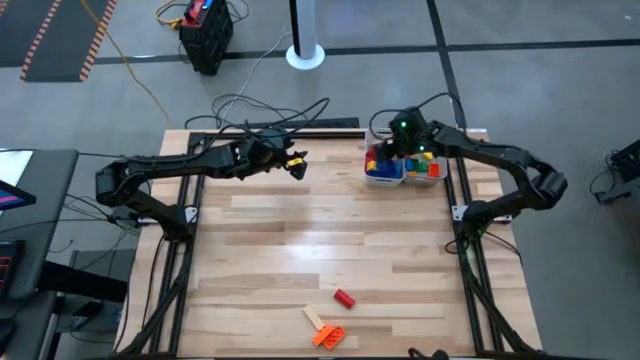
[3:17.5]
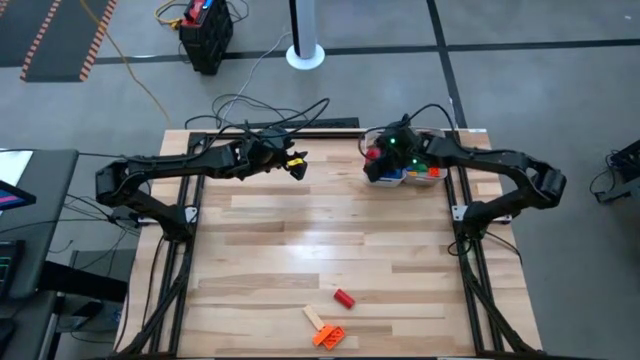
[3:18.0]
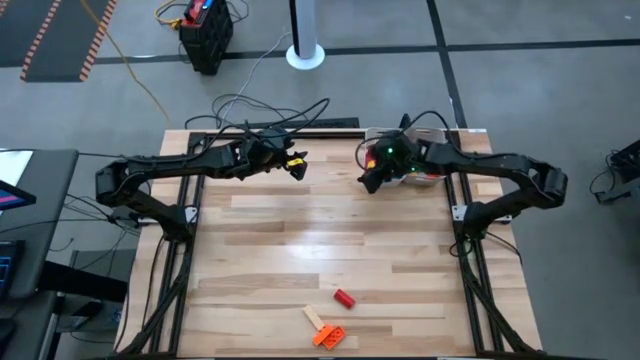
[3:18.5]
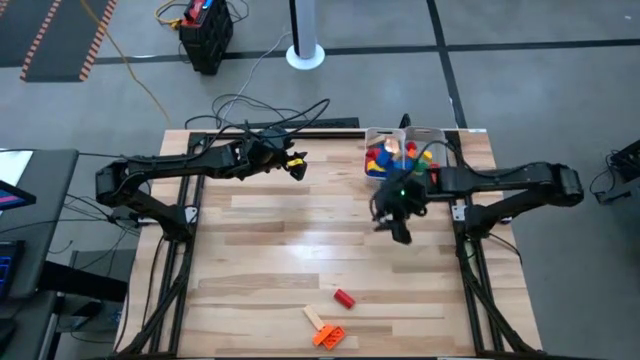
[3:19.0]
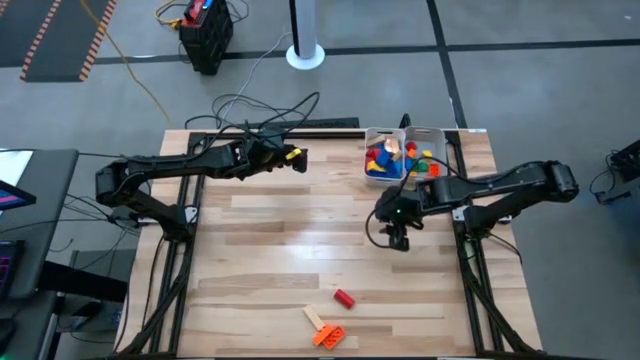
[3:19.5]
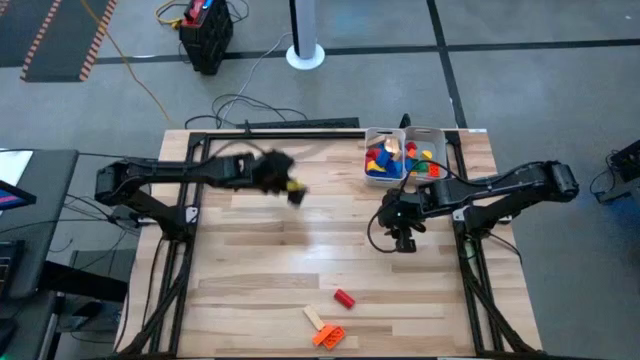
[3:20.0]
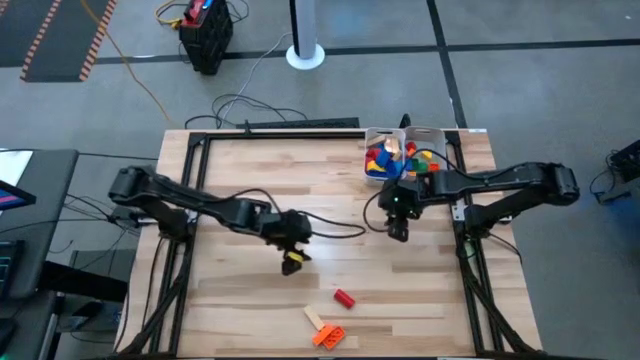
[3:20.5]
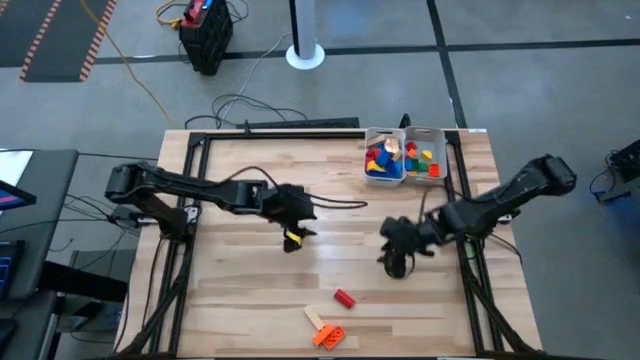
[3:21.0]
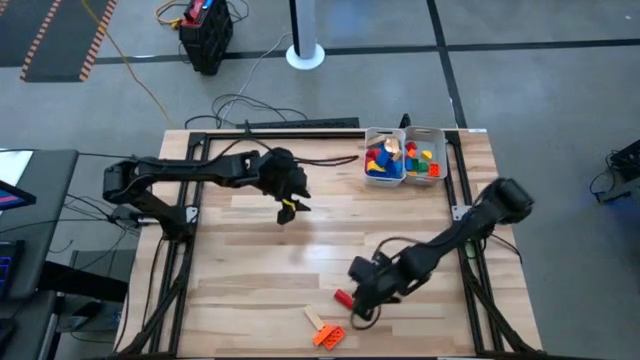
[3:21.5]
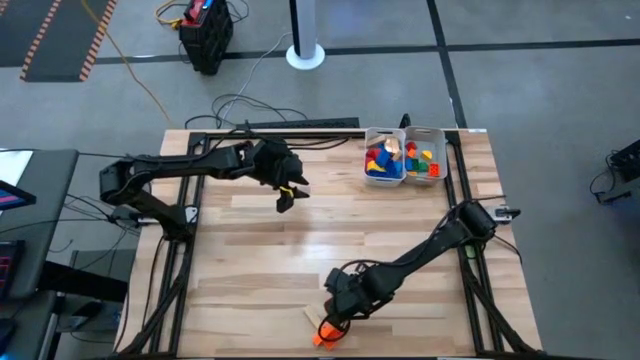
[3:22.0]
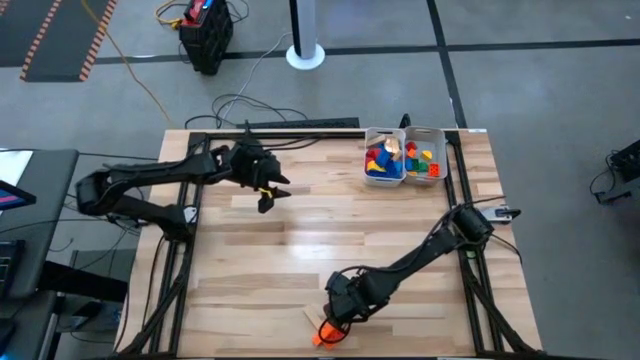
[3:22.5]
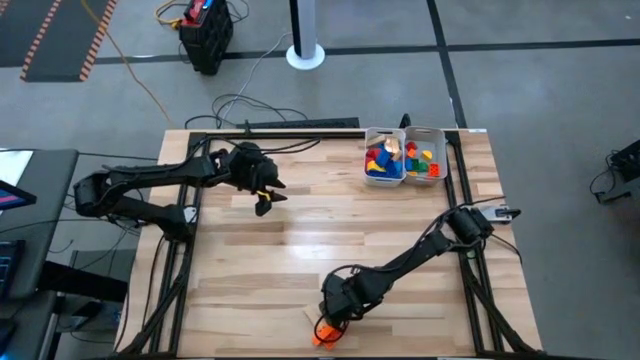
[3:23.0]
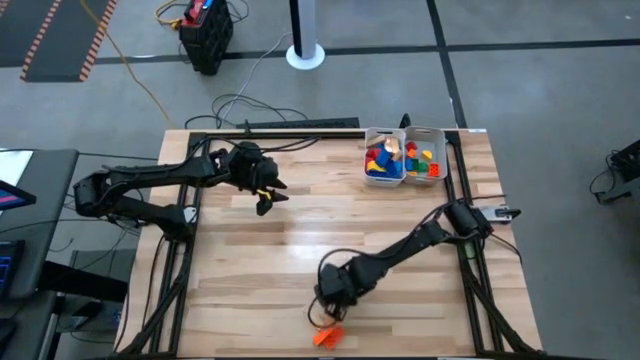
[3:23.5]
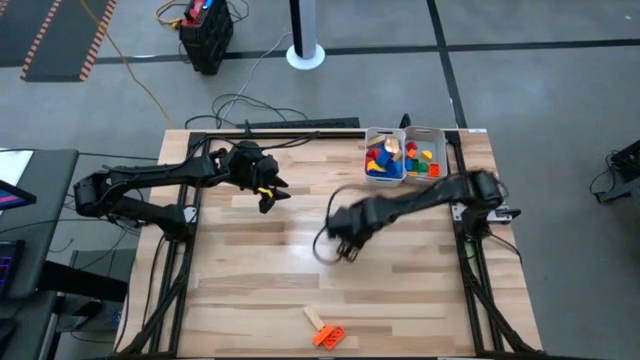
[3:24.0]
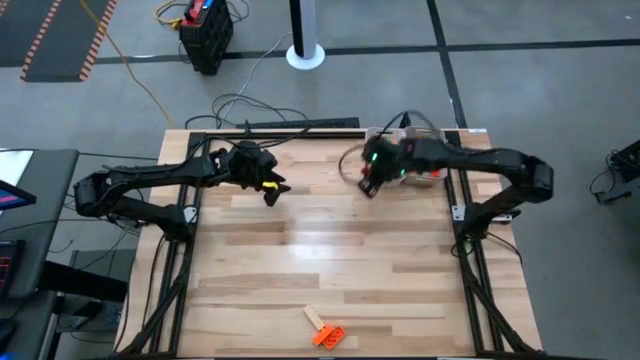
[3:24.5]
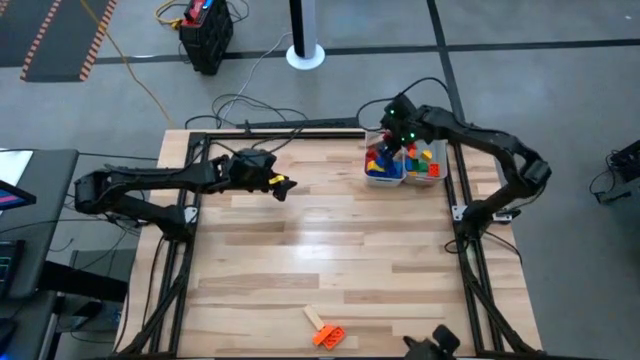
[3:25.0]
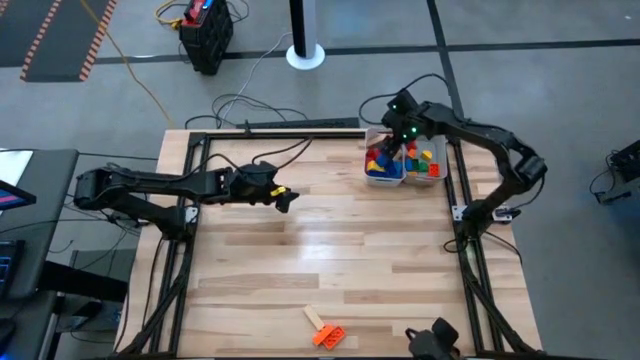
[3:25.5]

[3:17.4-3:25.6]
Task: Sort blocks by size
Put the large red cylindrical wooden block into the white bin

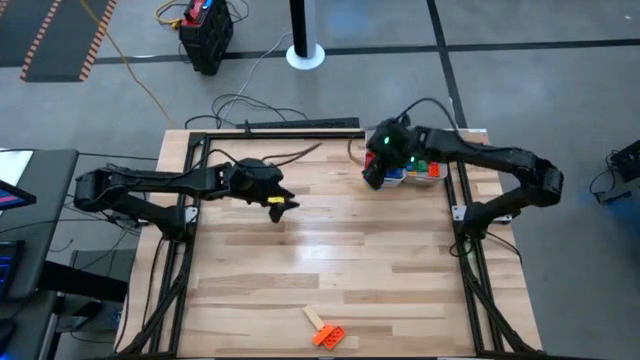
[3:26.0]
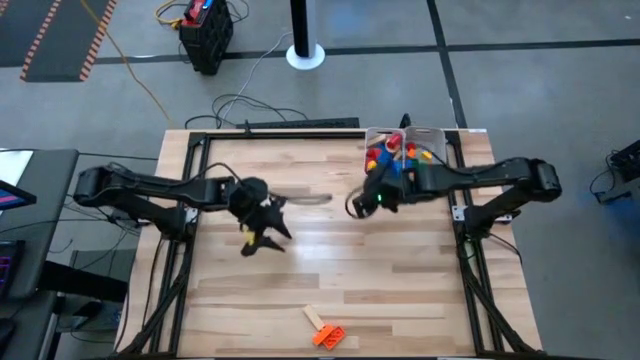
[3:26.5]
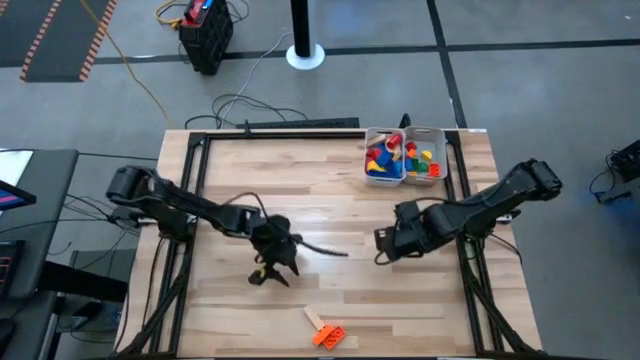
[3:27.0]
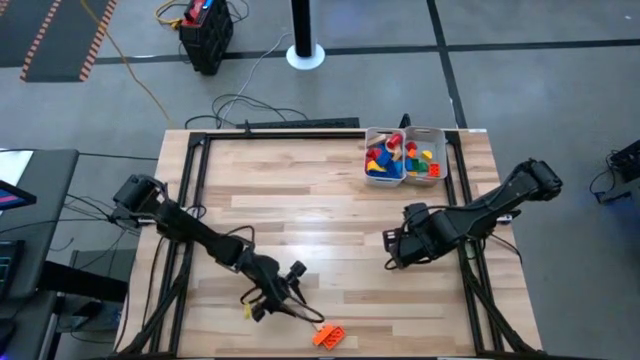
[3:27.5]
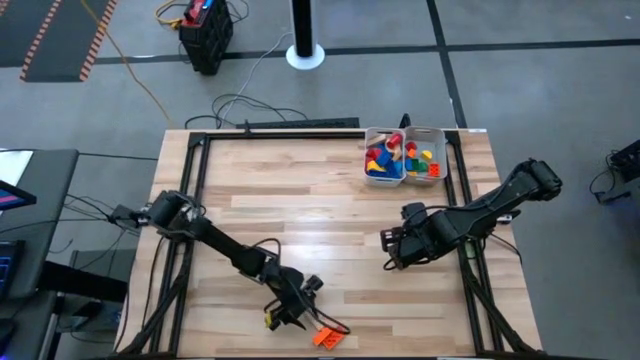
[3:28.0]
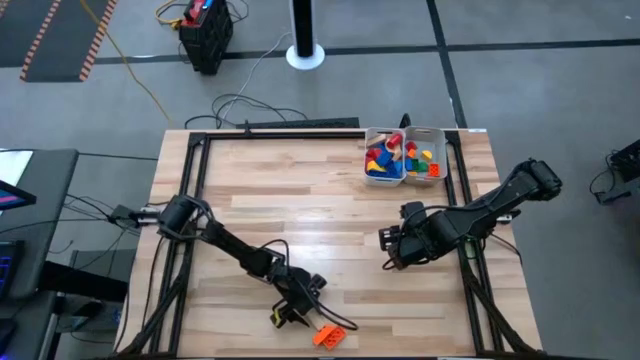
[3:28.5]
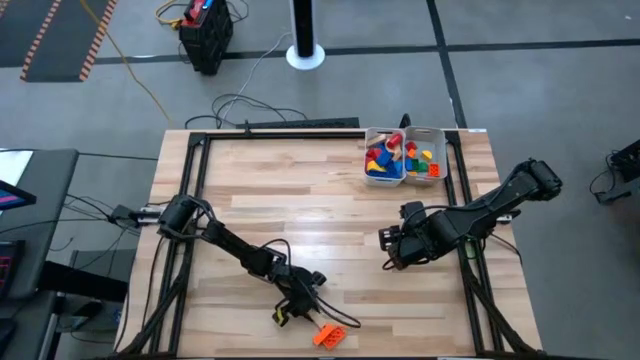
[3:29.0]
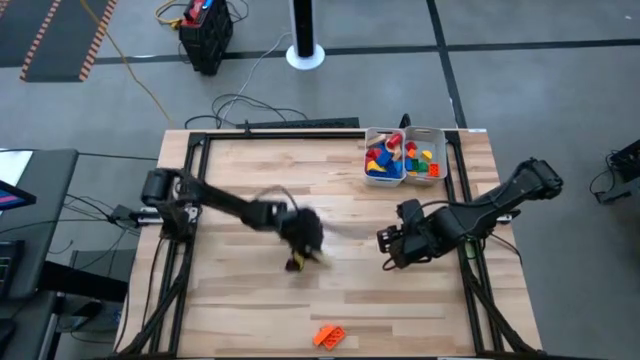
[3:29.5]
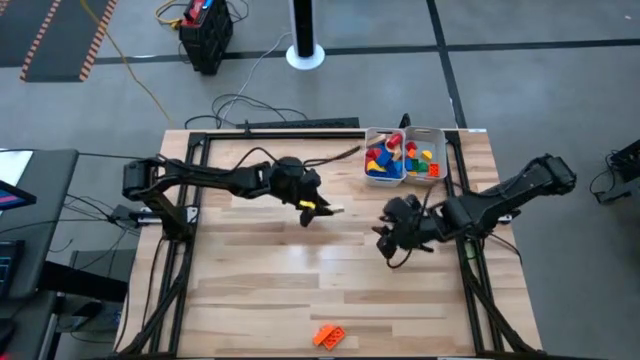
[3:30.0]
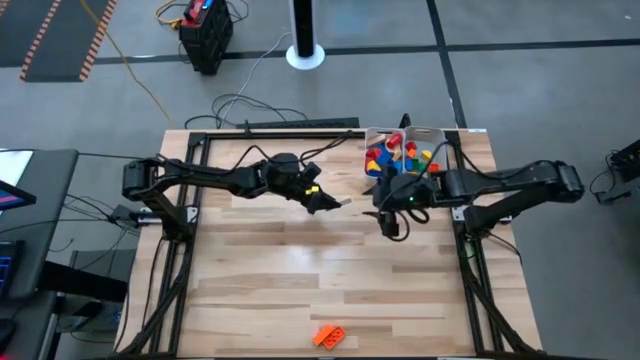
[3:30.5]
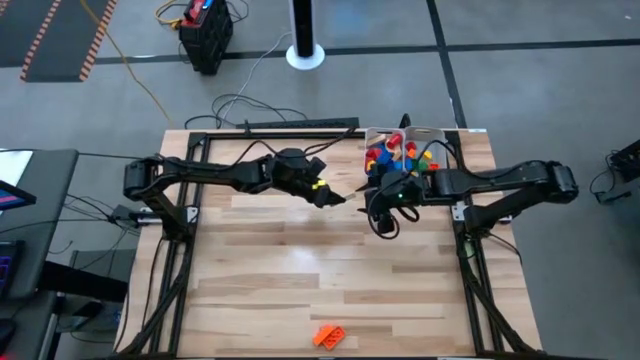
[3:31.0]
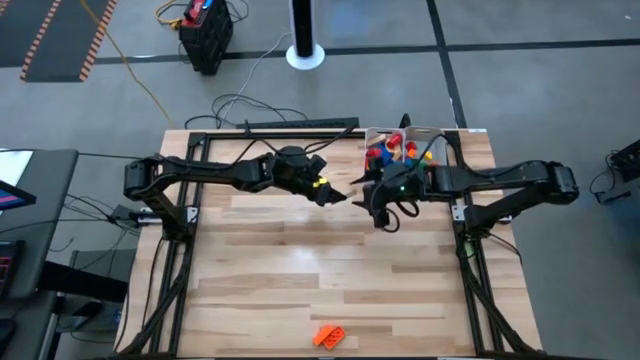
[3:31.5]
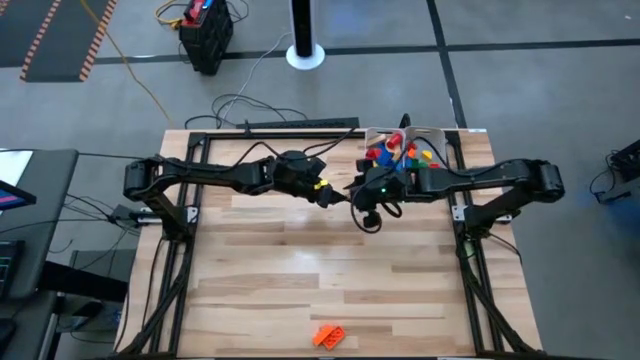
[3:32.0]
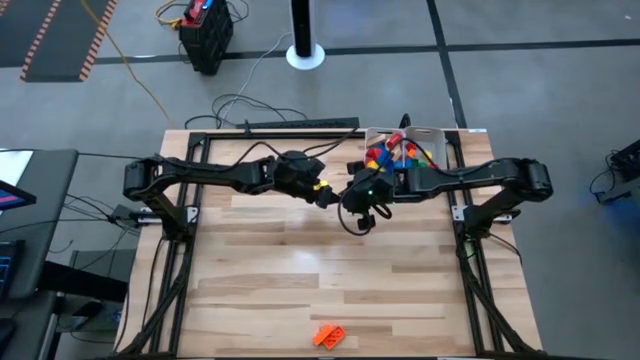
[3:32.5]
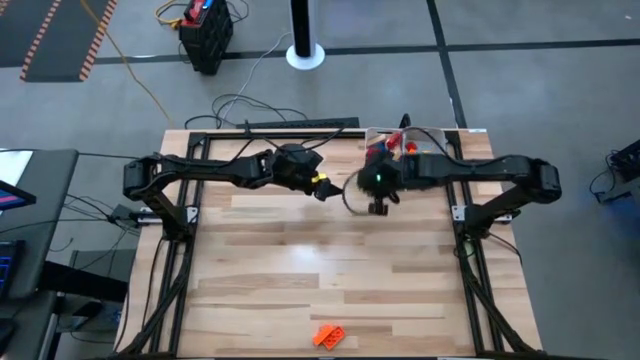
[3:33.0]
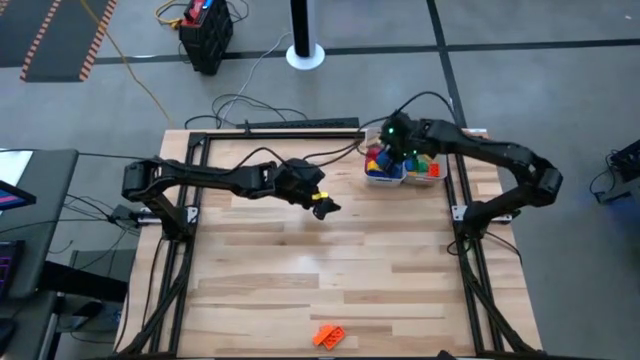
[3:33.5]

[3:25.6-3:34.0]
Put the large beige wooden block into the white bin

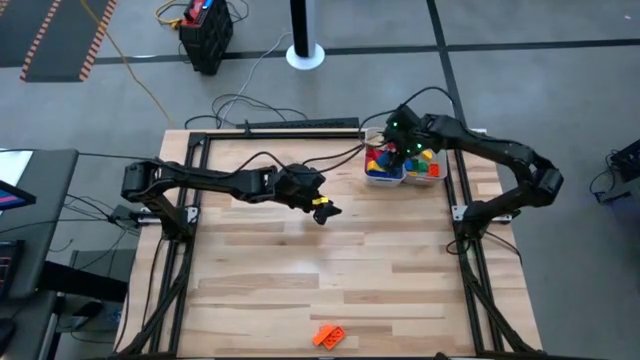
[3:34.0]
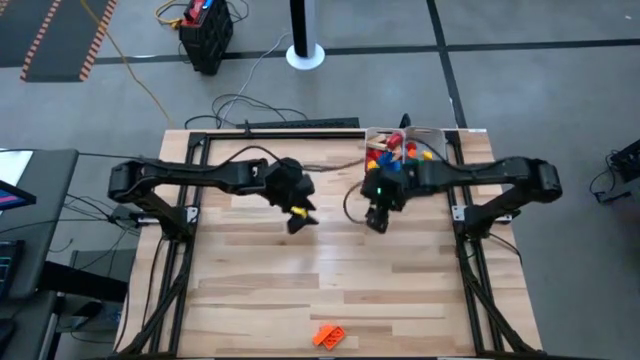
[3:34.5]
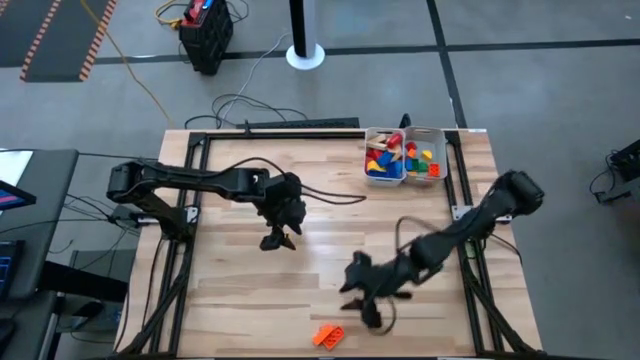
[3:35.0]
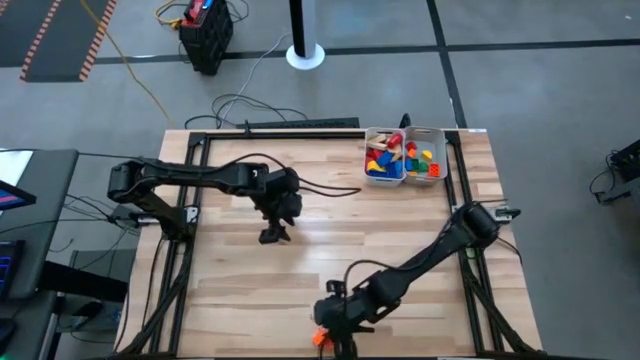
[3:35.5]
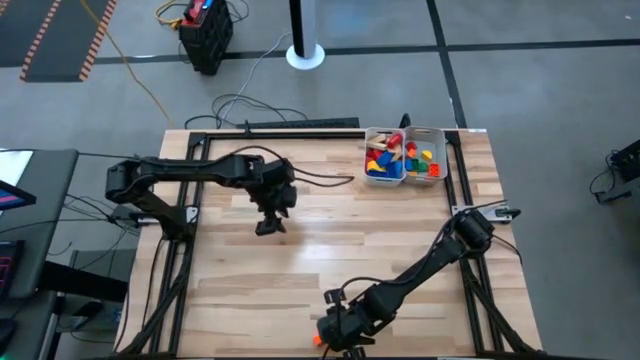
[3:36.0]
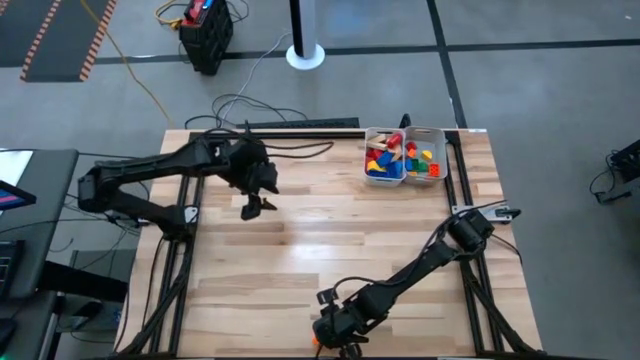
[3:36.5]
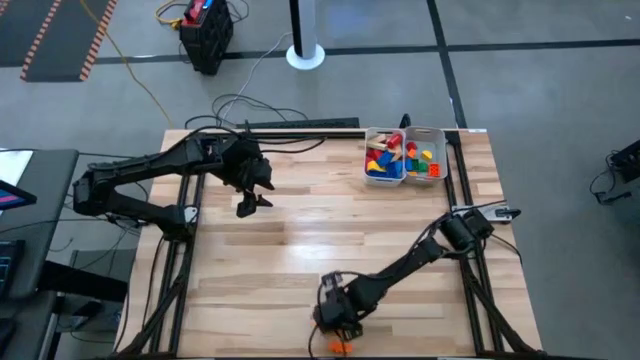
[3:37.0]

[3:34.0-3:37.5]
Adjust the large orange game piece

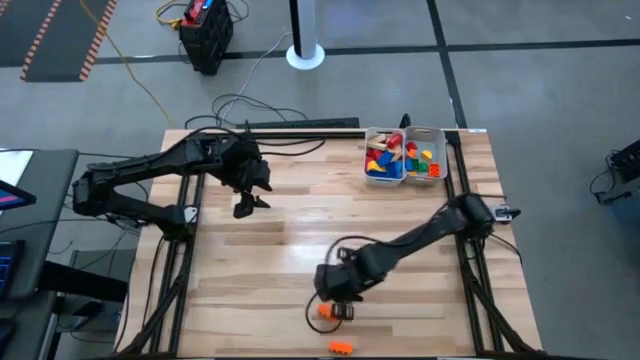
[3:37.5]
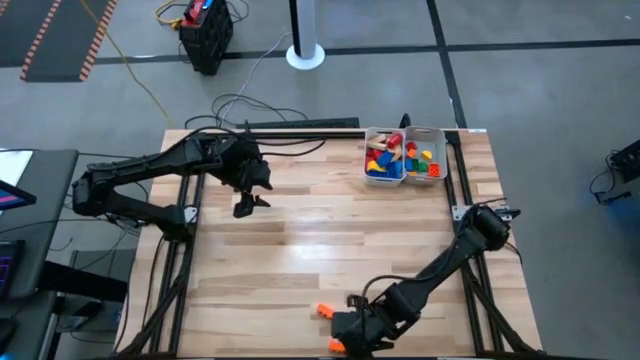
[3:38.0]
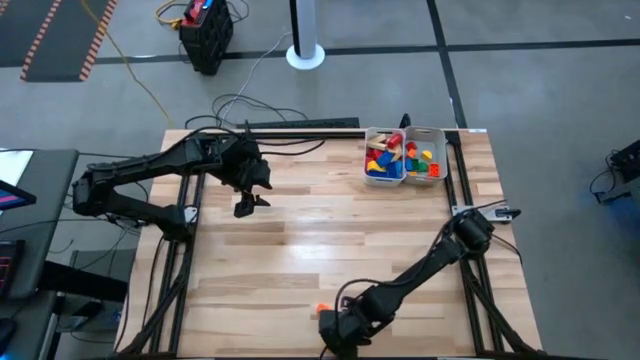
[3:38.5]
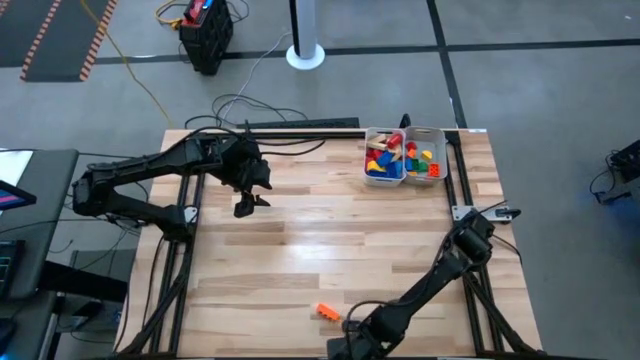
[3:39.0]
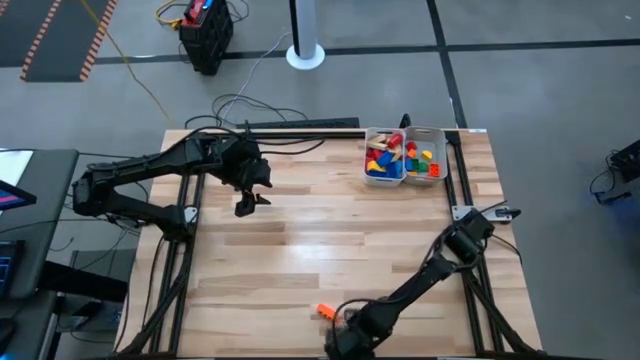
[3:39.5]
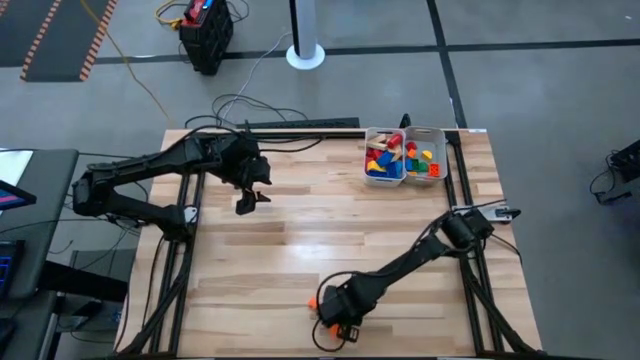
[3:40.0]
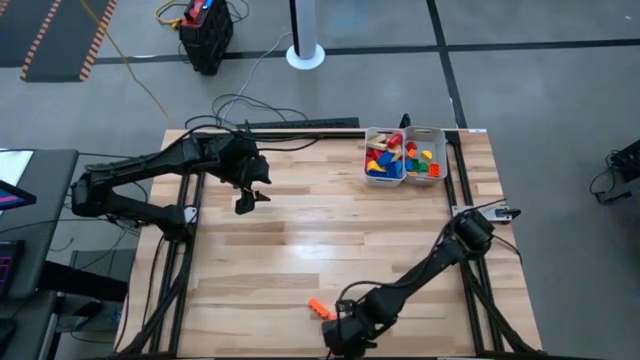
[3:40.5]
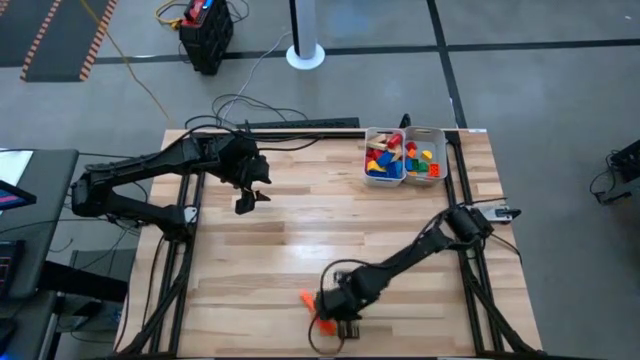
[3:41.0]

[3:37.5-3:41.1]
Adjust the large orange game piece
